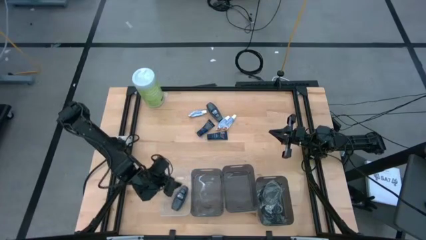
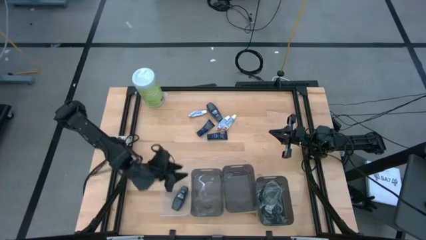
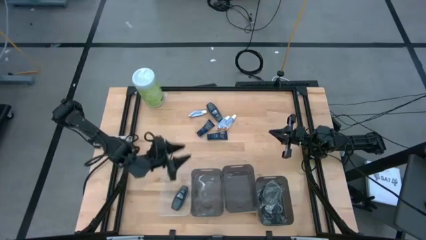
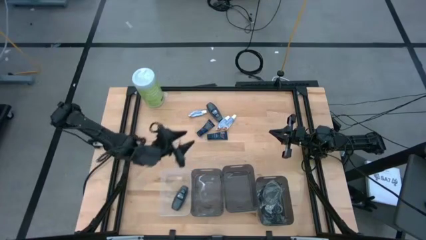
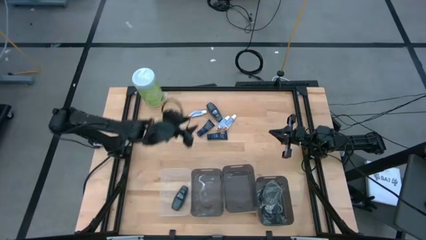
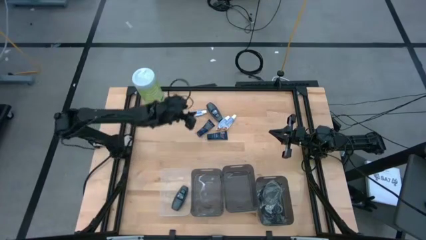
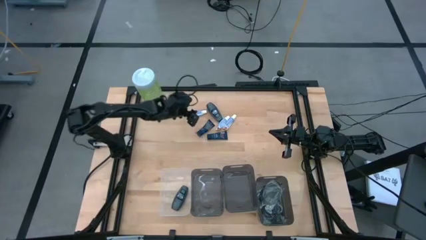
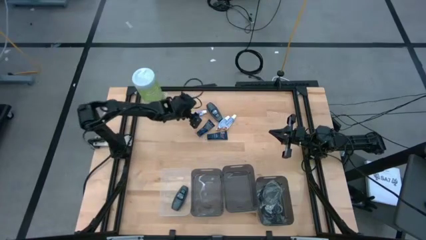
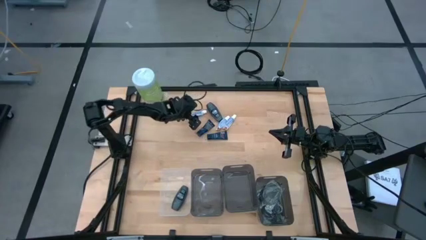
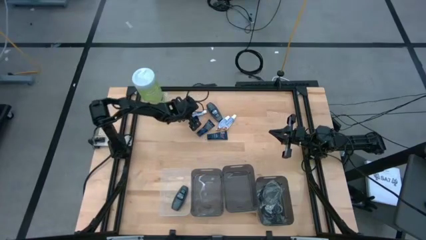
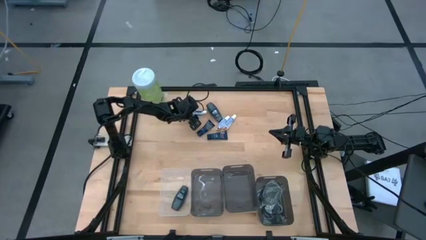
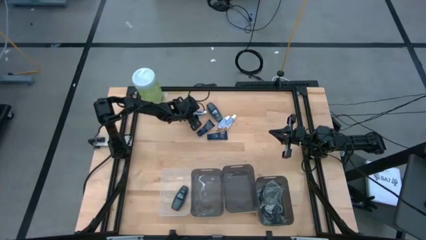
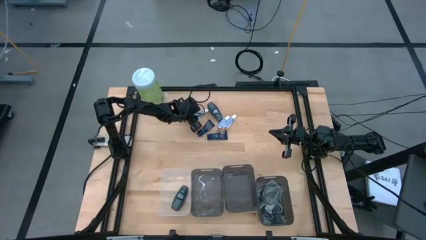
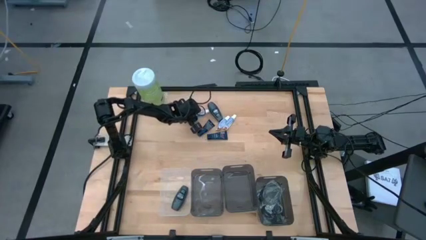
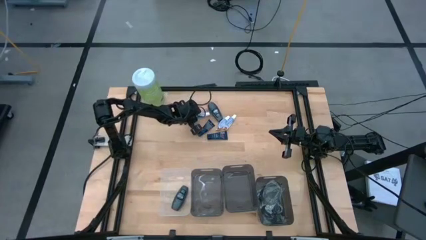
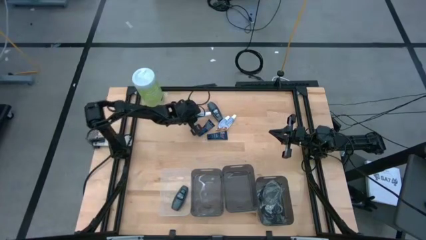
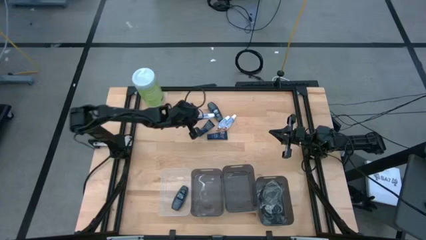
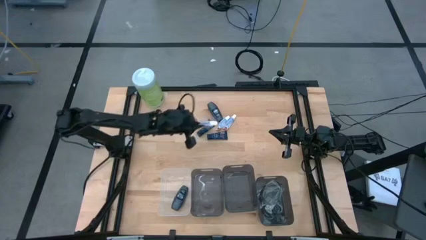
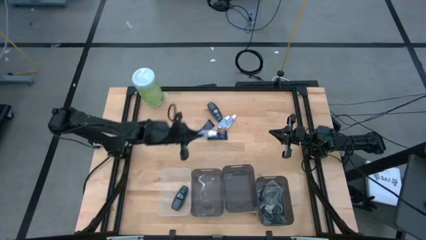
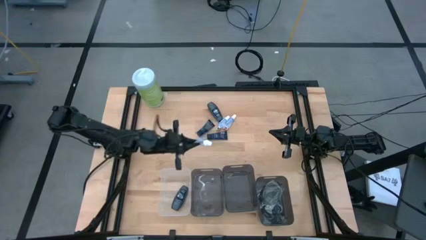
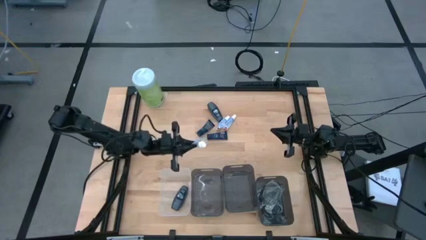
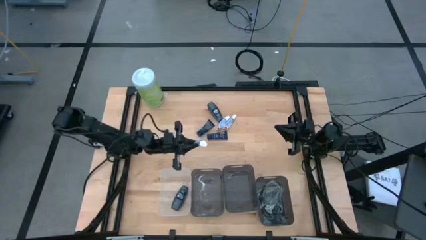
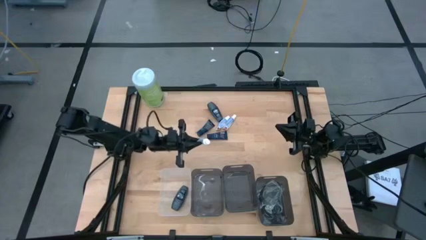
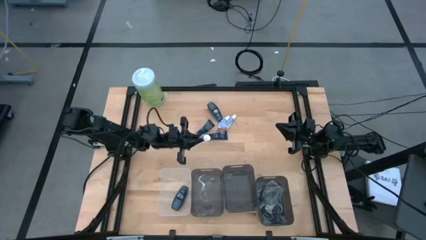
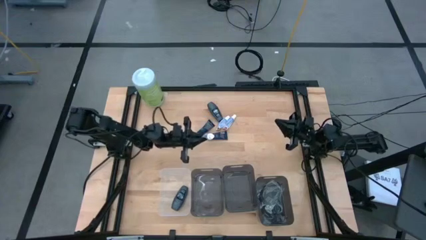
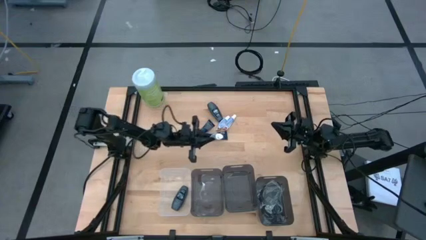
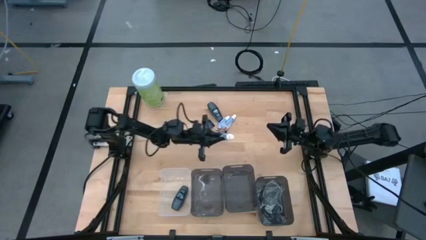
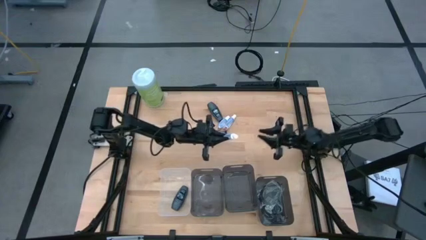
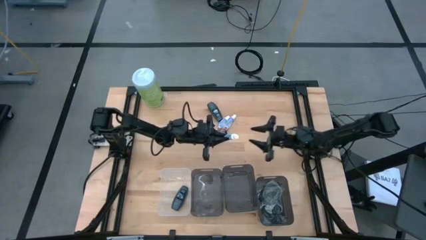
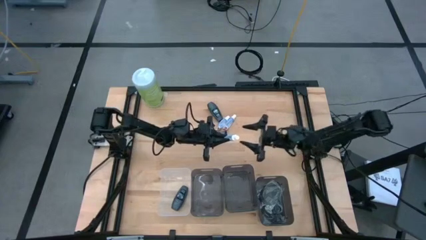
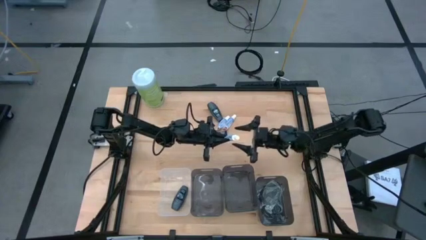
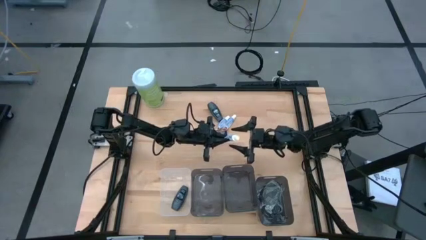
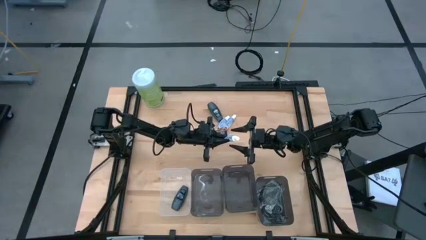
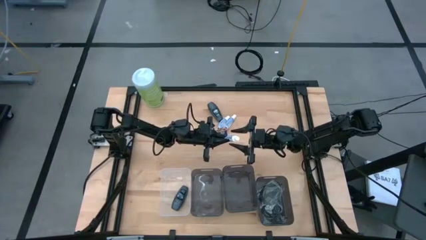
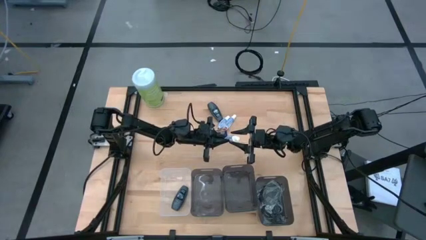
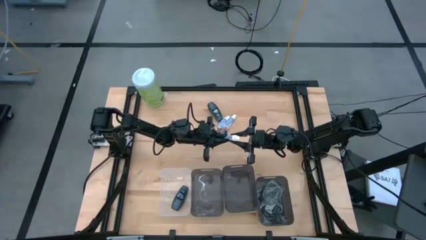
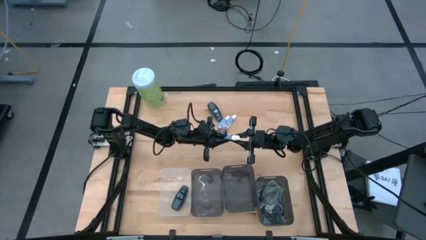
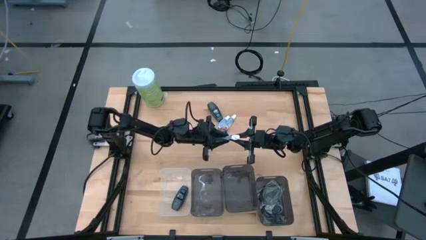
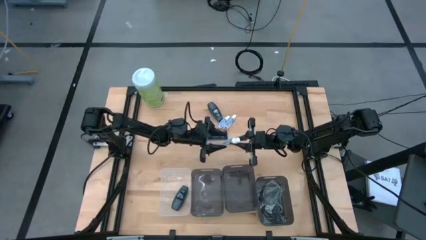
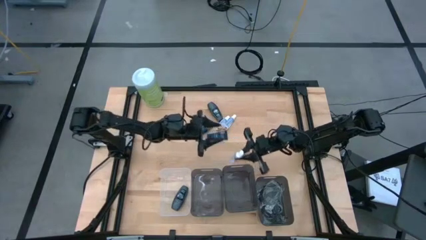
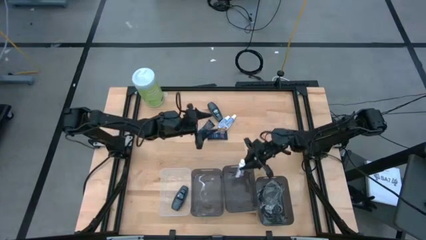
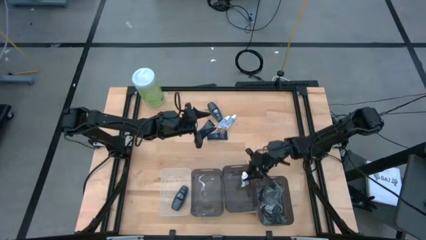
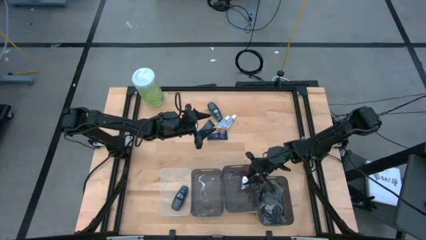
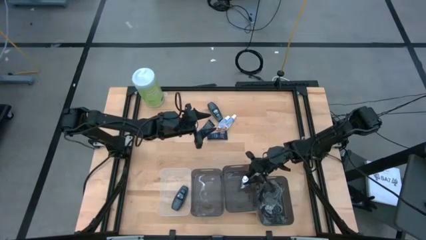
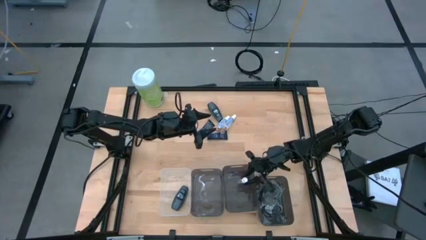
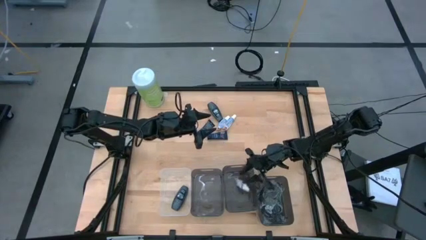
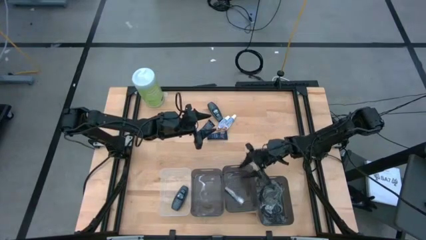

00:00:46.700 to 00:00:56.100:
Task: Pick & Place Travel size toiletries
Put the left white toothpaste into the middle black bin

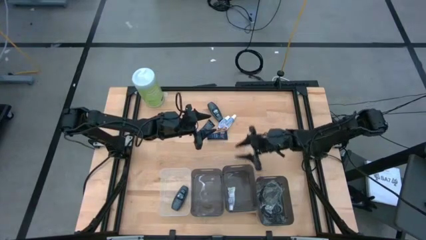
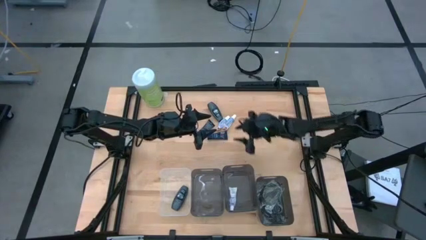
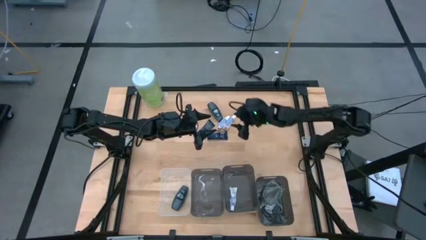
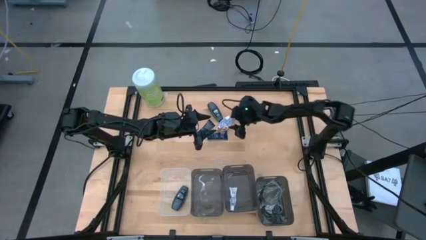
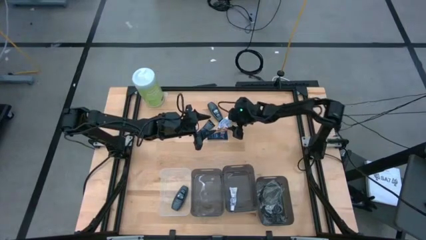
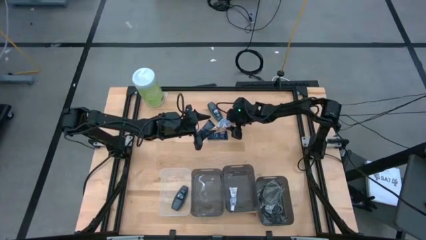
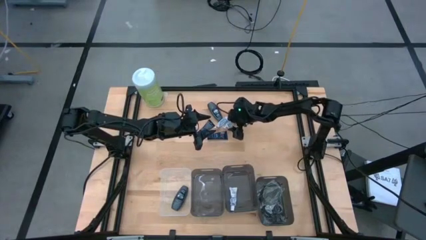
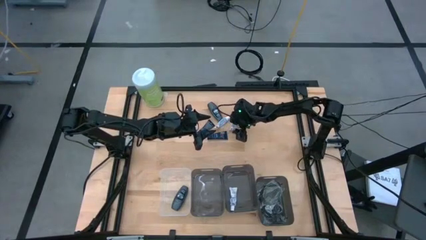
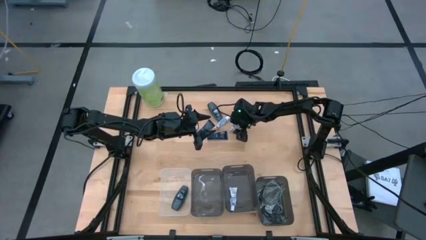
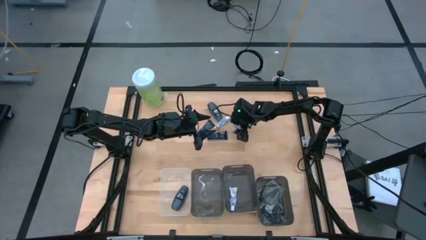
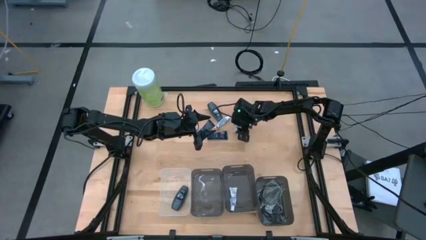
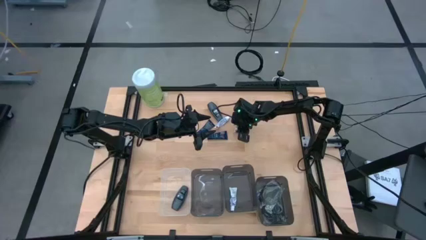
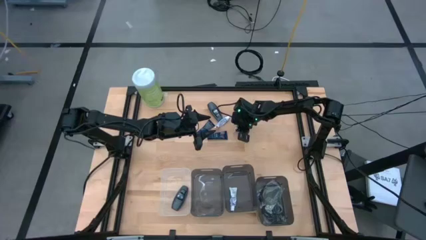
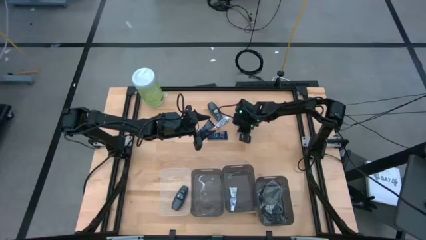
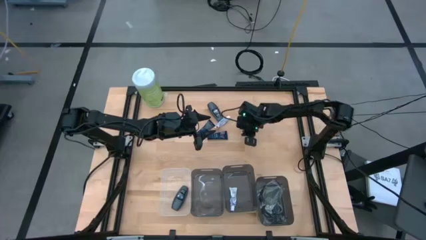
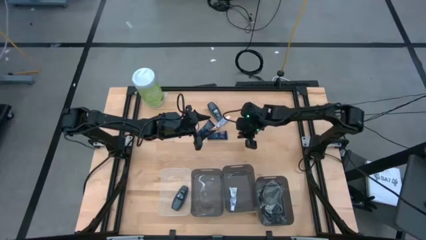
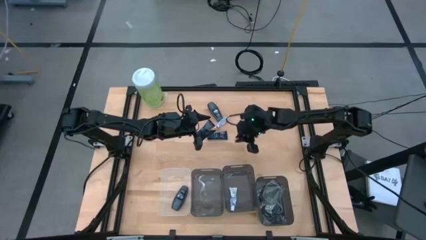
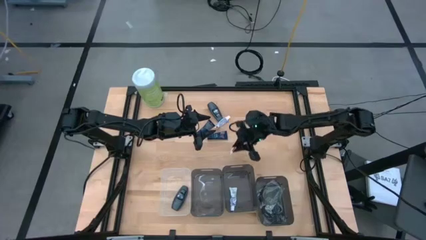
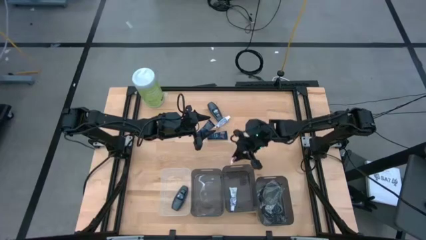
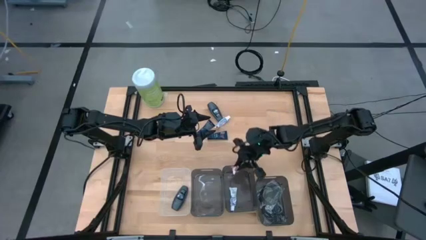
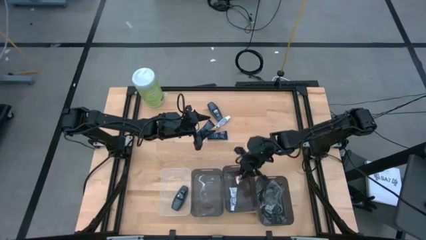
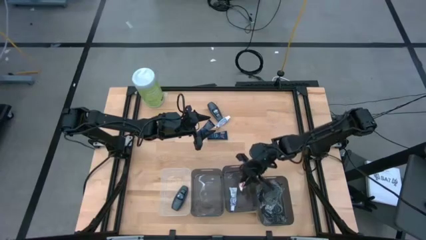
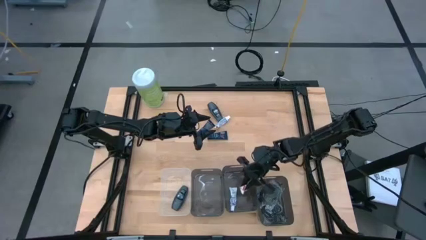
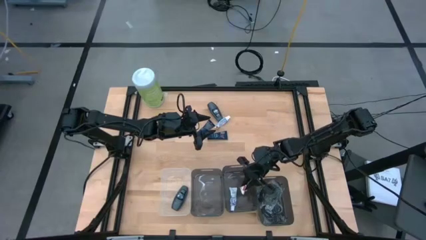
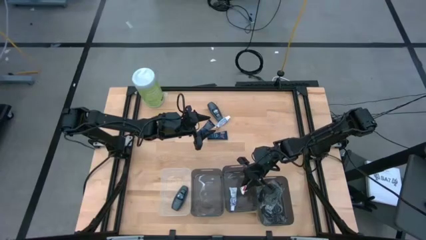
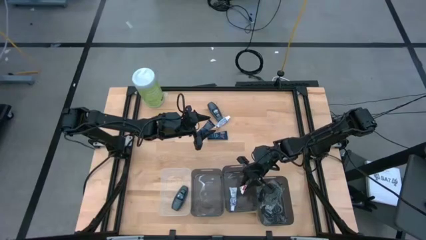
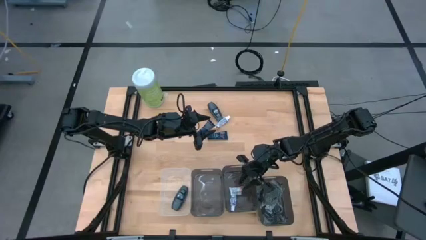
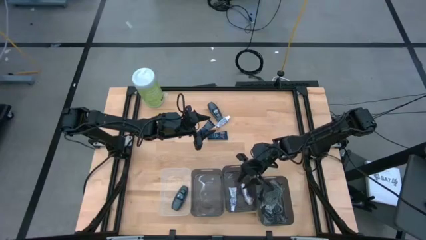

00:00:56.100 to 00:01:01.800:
Put the right white toothpaste into the middle black bin

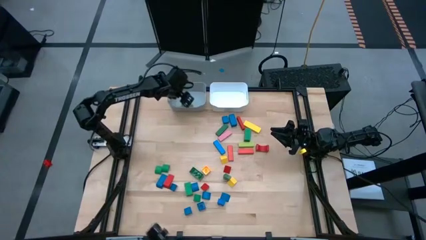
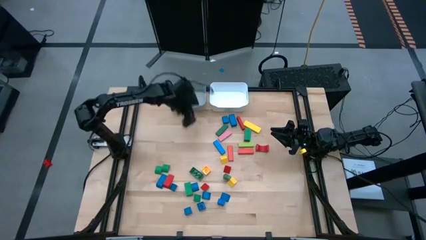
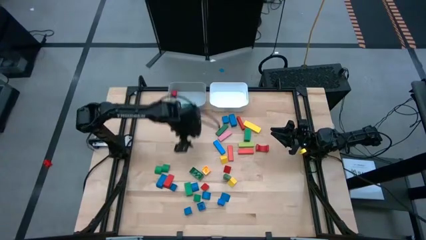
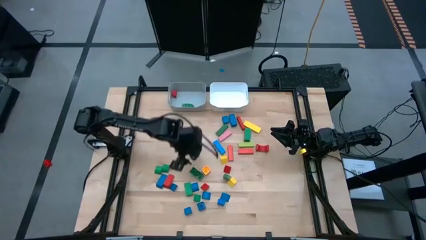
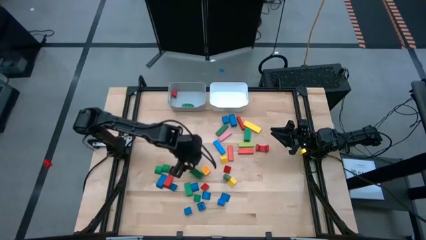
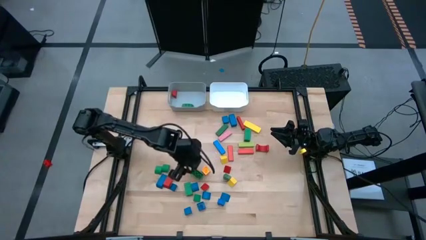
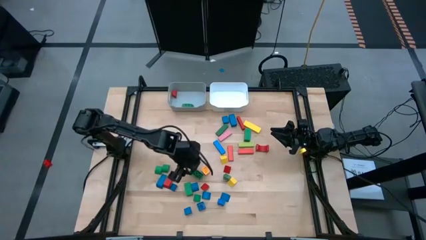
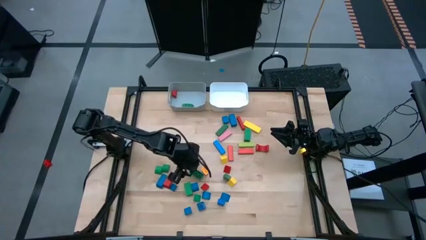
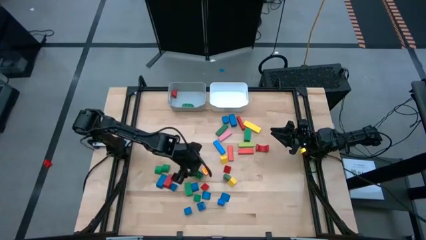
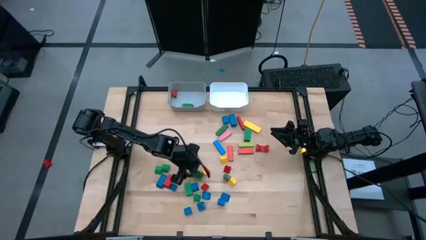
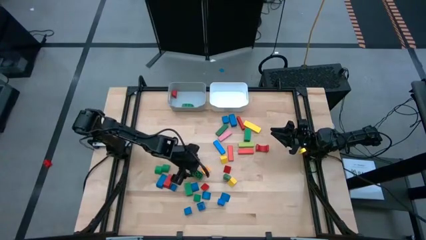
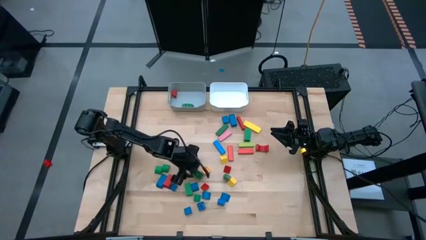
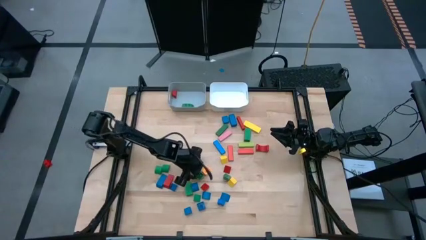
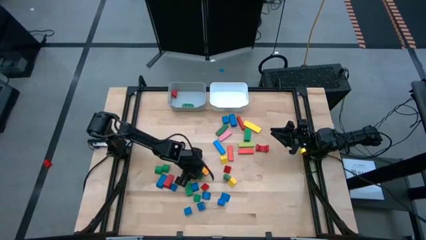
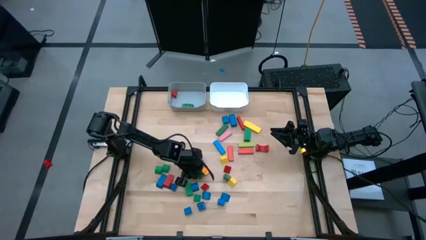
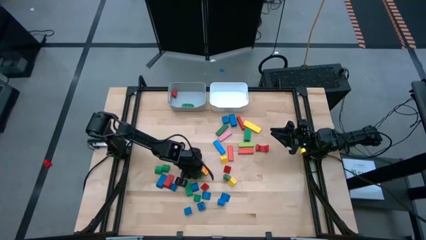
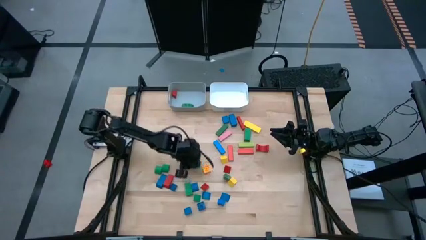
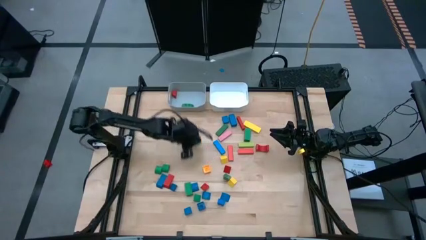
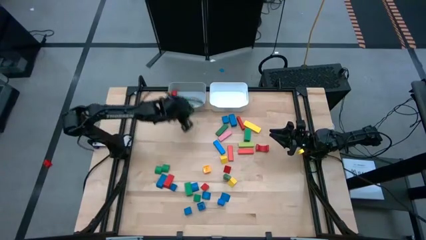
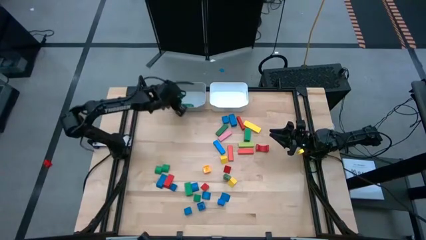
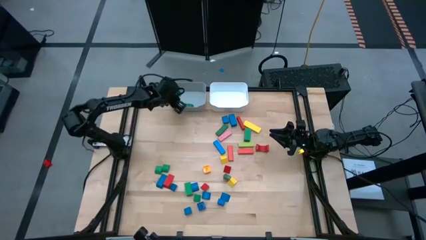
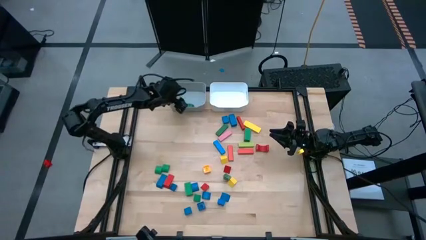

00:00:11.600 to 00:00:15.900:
Task: Sort blocks by size
Put the 8-stud green rectangular game piece into the gray bin
